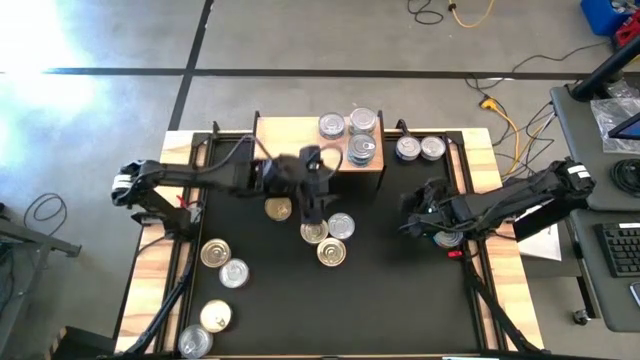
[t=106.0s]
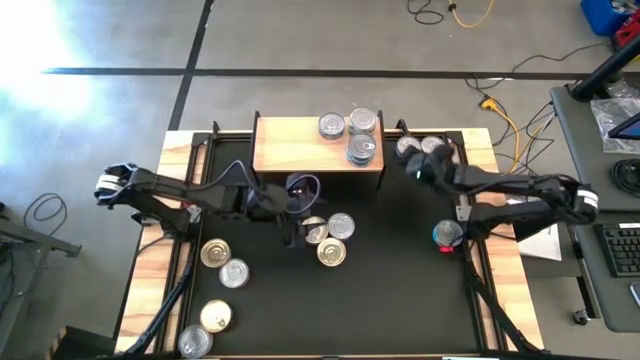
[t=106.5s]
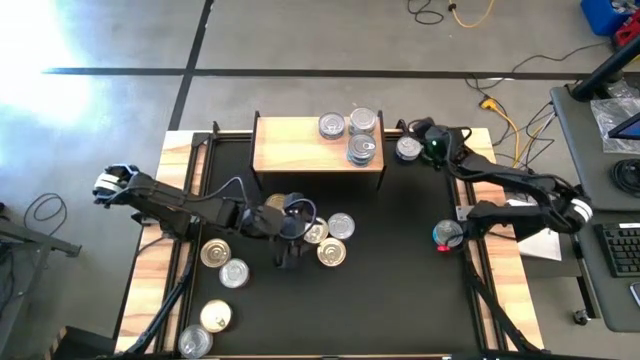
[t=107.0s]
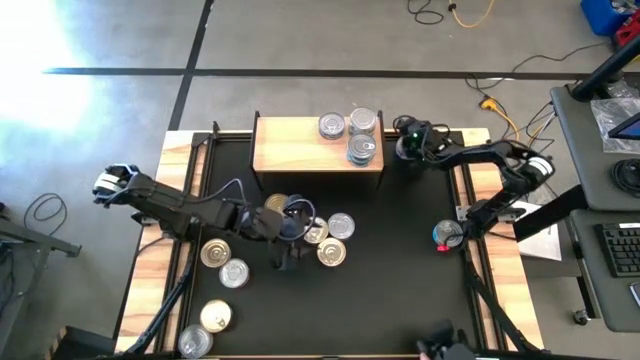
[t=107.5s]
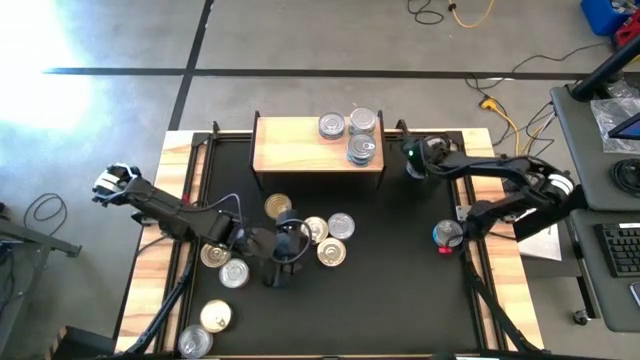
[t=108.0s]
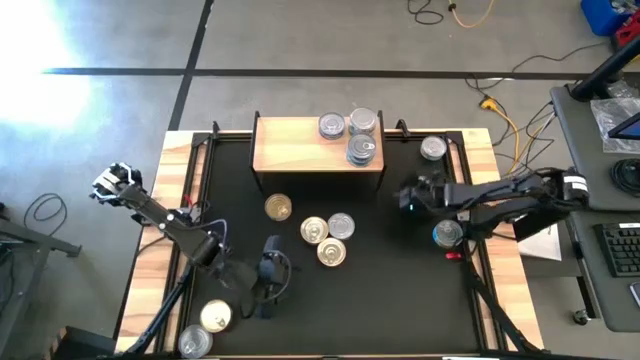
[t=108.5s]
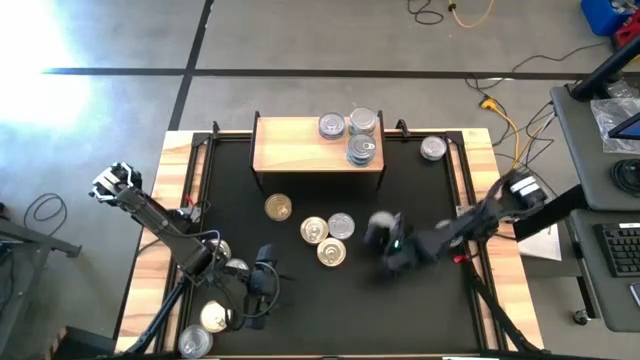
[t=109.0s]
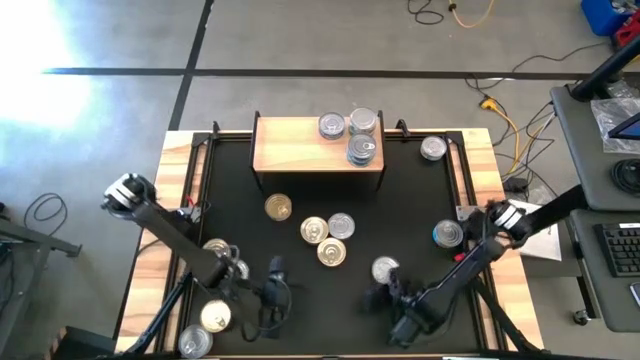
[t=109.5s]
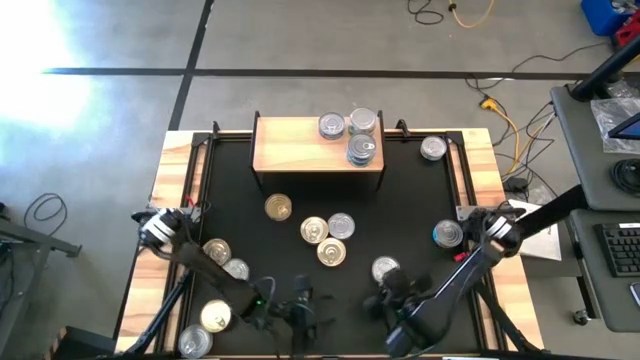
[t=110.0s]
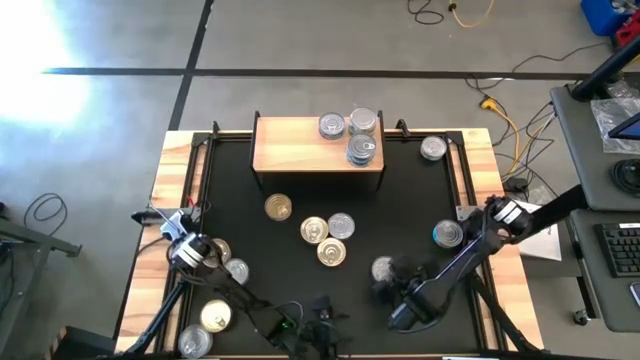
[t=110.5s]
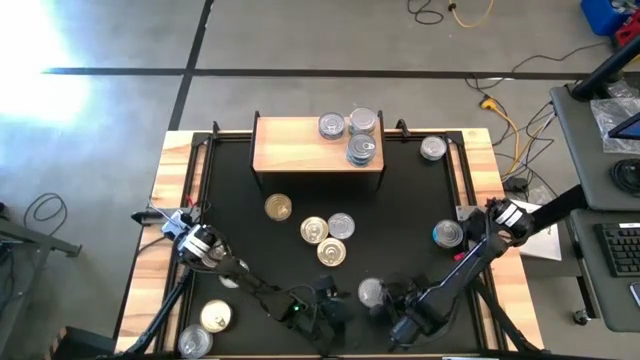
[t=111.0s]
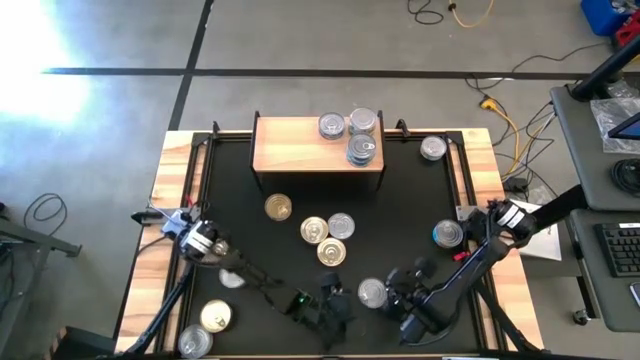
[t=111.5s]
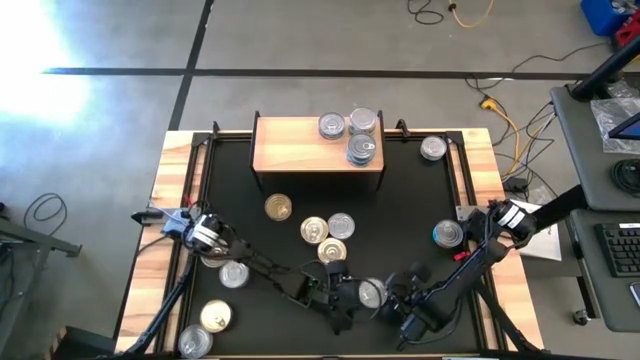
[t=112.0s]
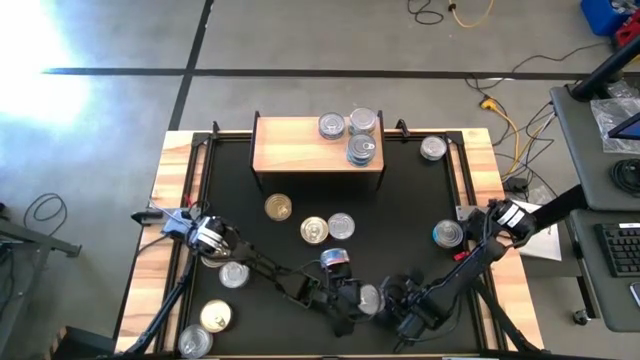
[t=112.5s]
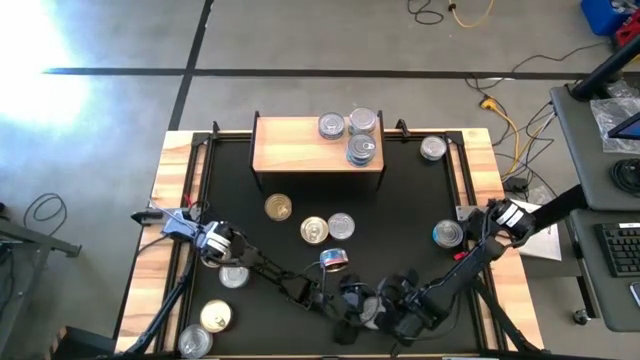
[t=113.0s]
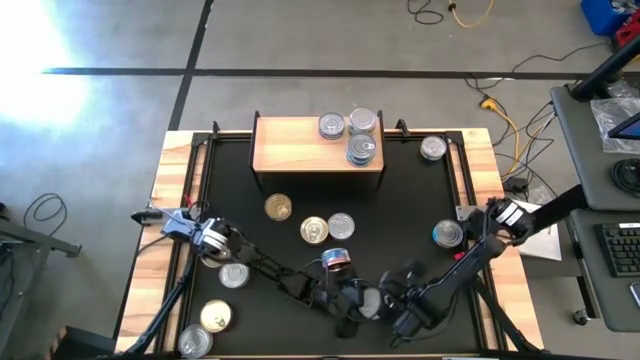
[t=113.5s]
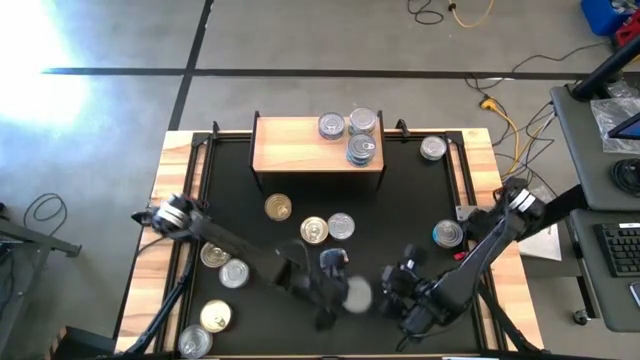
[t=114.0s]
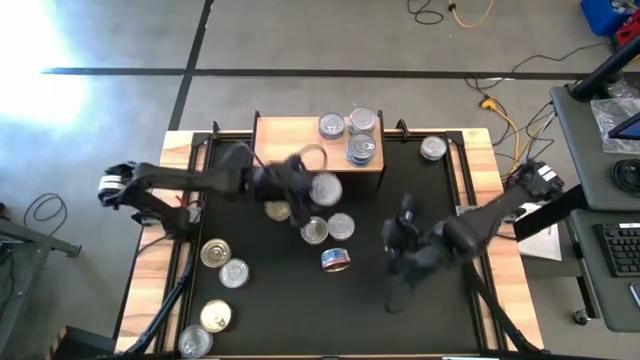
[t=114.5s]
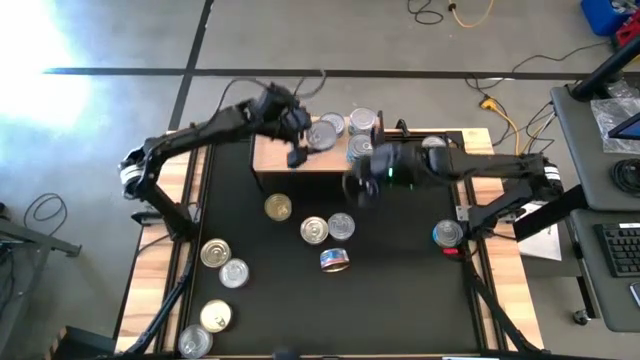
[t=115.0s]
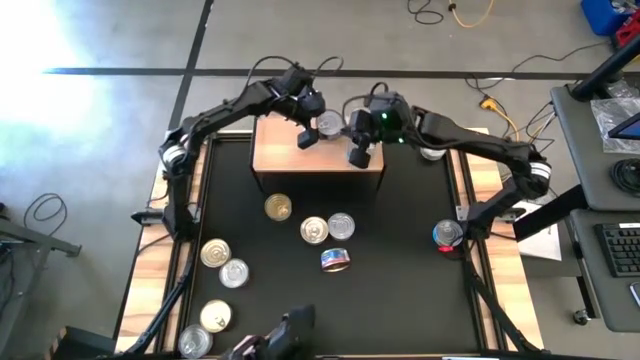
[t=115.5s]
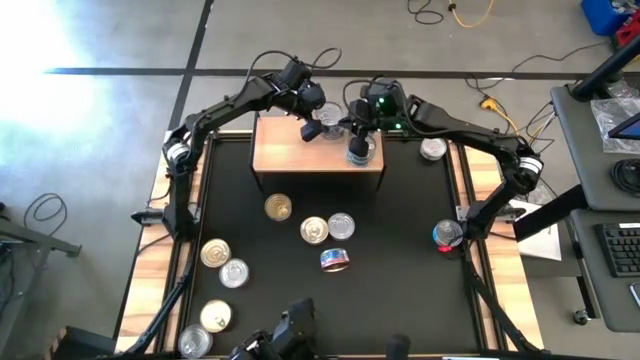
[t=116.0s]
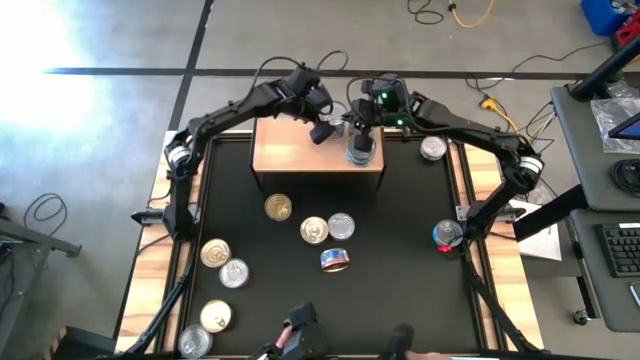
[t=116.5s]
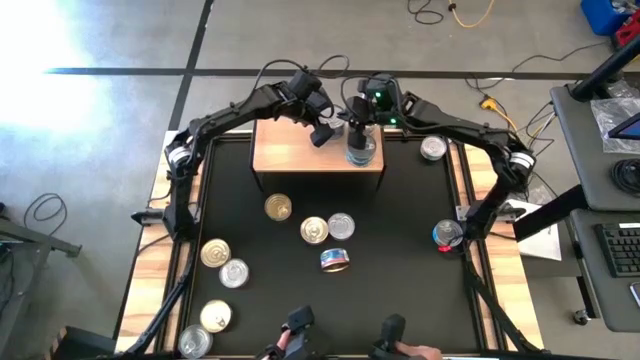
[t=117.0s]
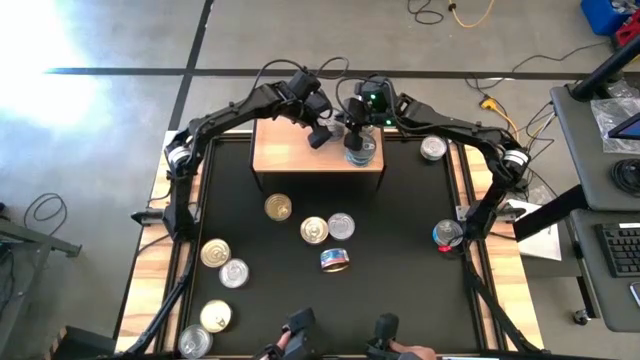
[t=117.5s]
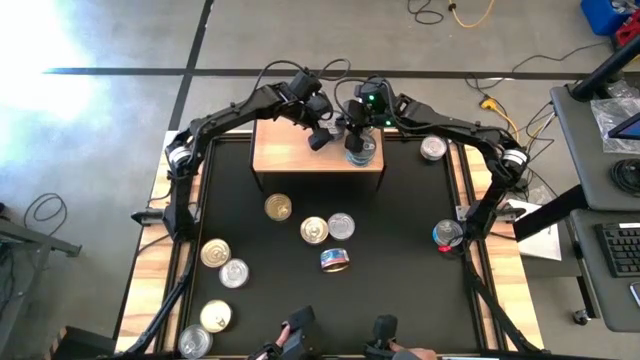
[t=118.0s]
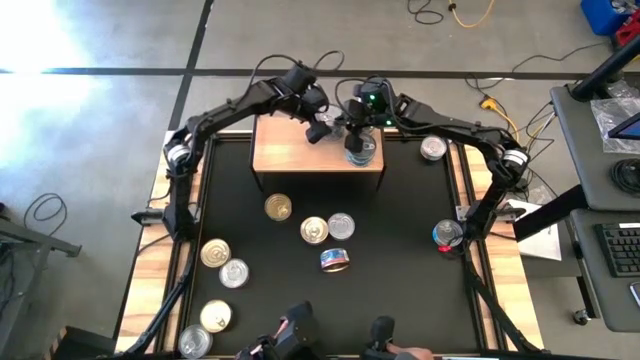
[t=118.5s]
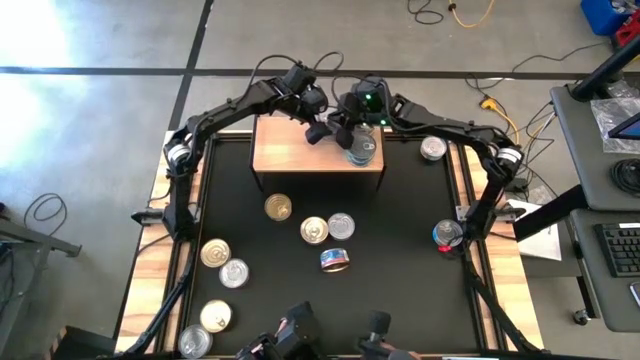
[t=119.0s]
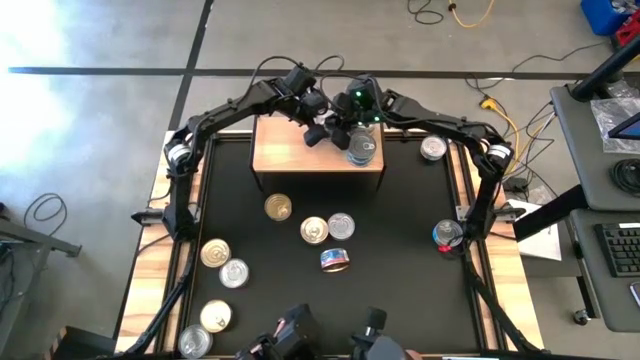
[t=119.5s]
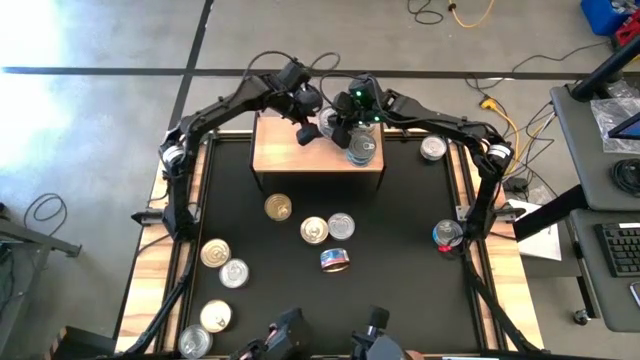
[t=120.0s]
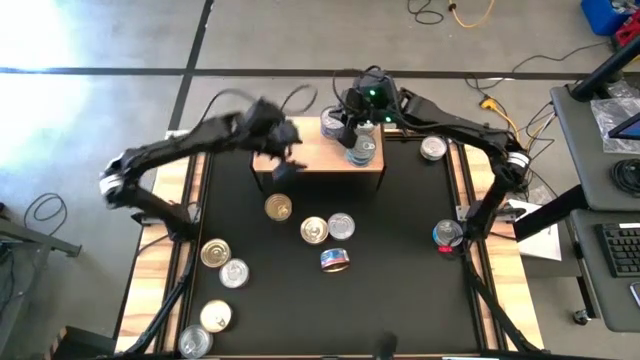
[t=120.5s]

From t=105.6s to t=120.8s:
Task: Stack canned seafood by type on shelf
Stack the blue tuna can on top of the blue tuna can on the shelf

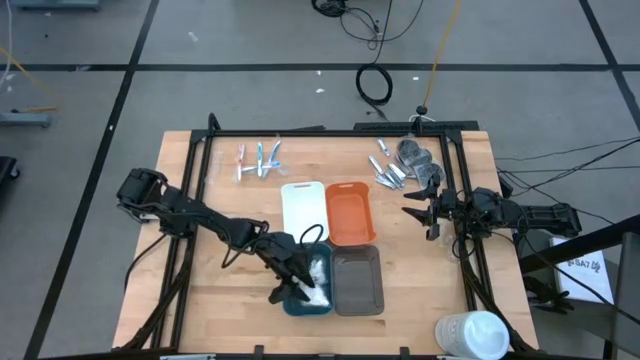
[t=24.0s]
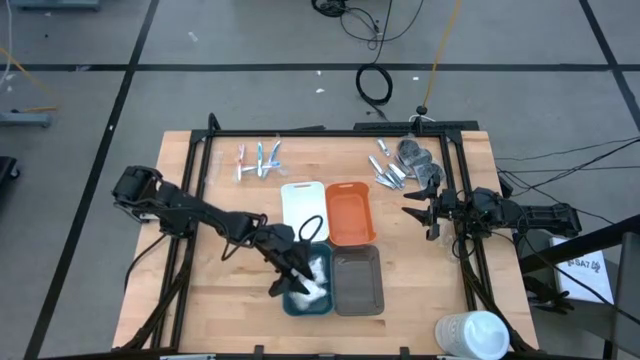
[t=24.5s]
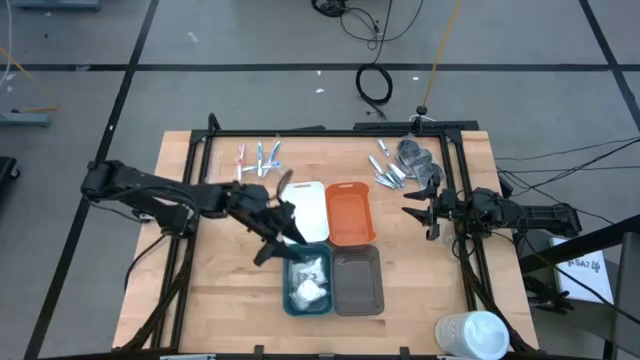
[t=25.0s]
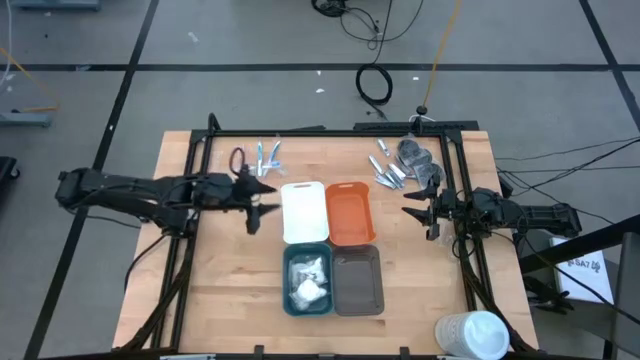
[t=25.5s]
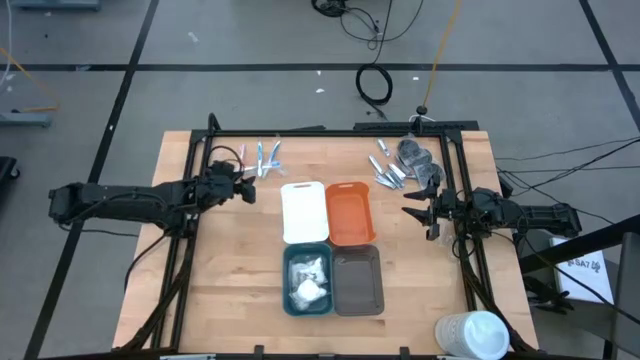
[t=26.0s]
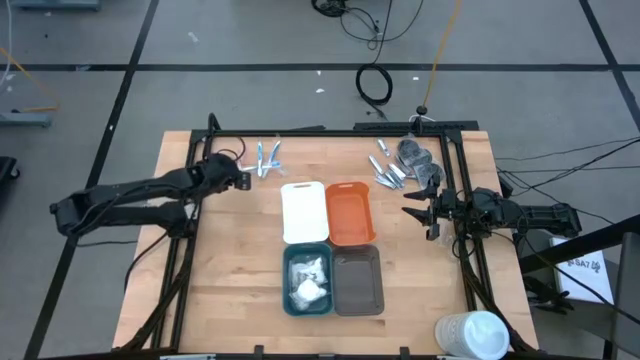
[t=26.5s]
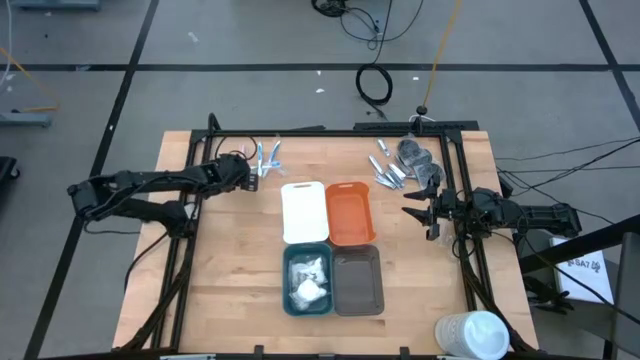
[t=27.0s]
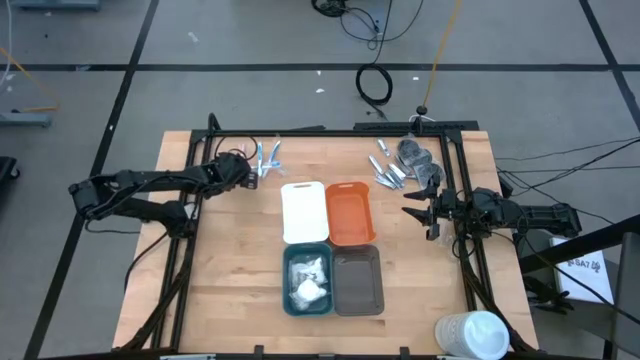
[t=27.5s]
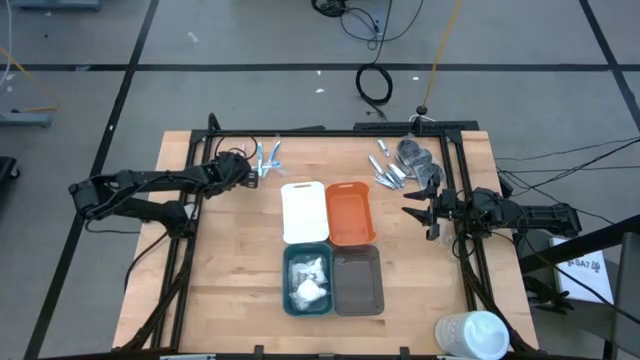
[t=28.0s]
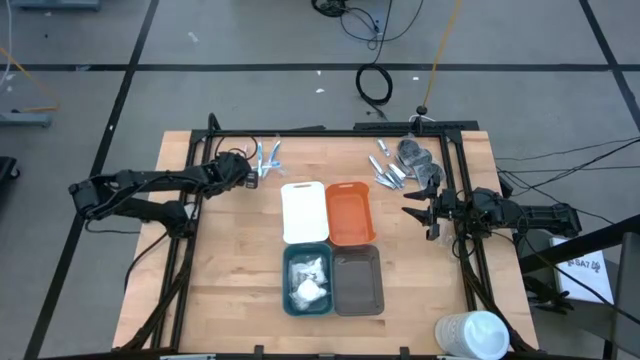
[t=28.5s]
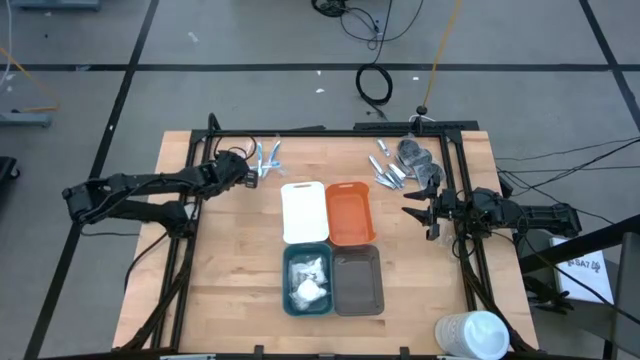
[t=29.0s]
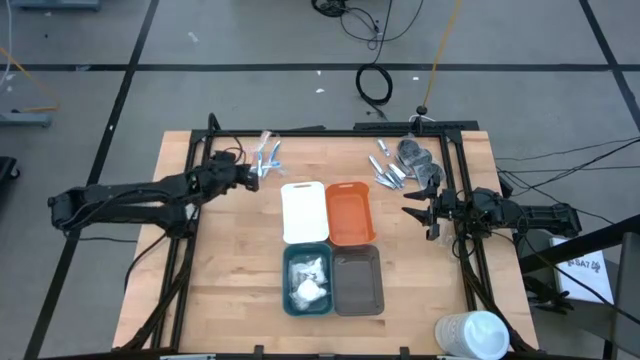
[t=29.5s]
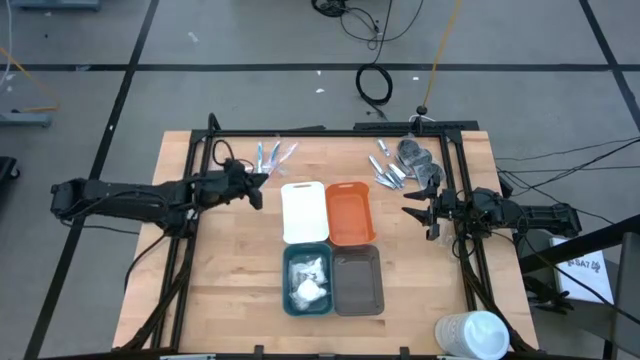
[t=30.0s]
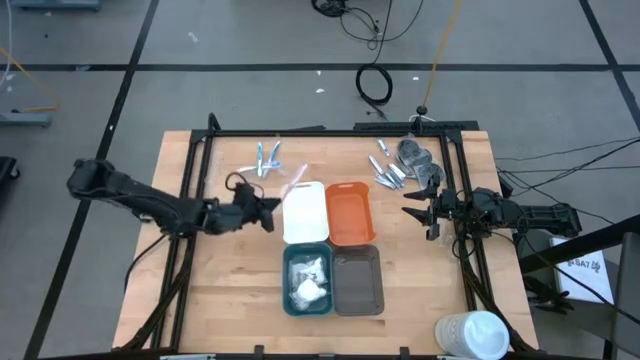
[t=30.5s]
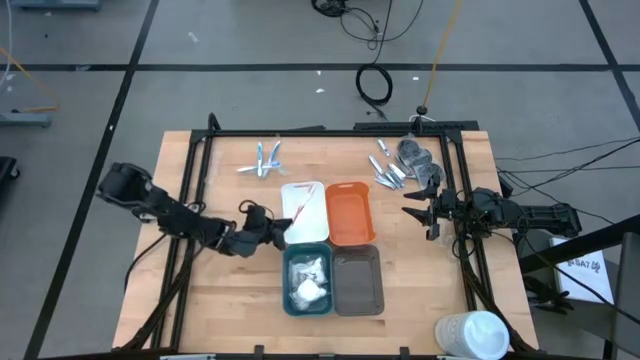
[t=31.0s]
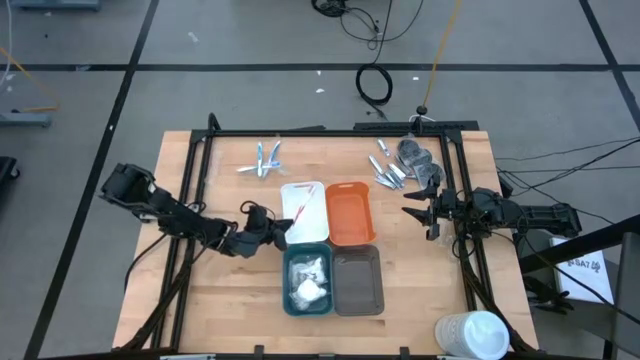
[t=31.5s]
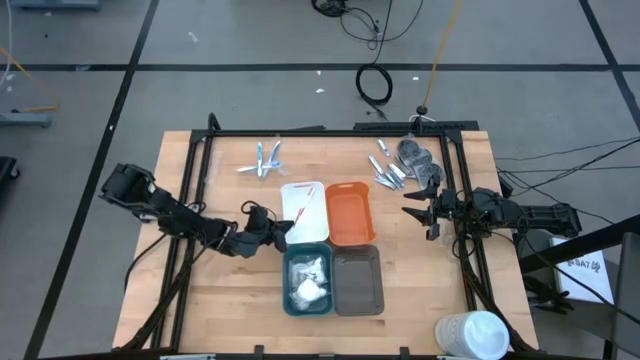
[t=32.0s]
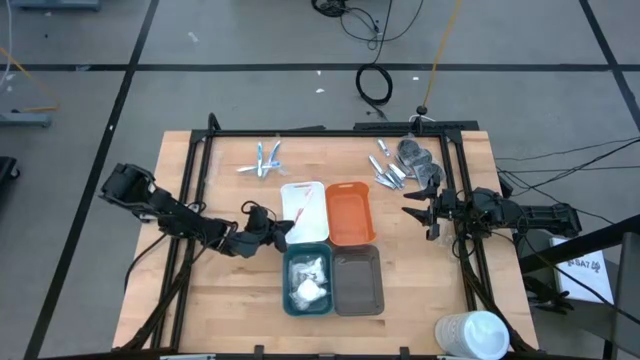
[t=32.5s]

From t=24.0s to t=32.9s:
Task: Pick & Place Travel size toiletries
Put the red toothbrush into the white bin
